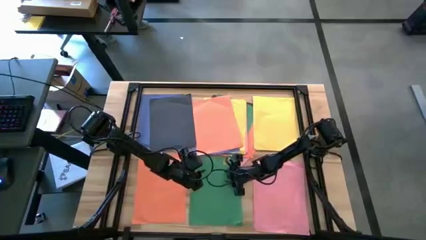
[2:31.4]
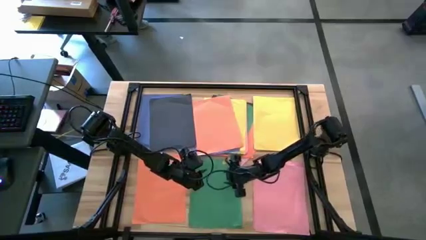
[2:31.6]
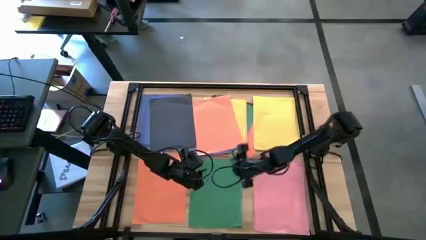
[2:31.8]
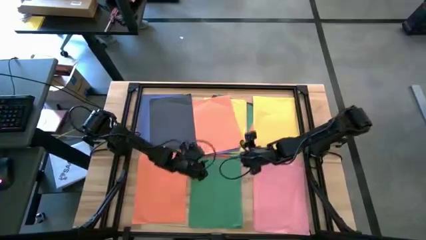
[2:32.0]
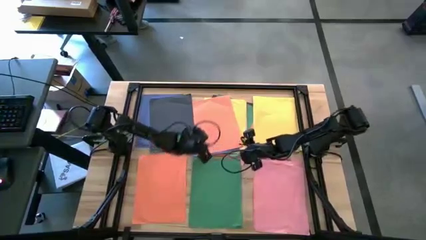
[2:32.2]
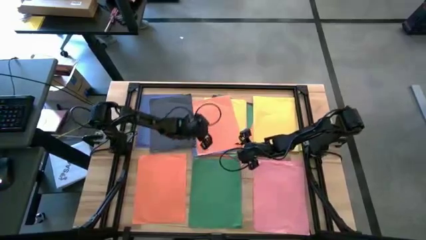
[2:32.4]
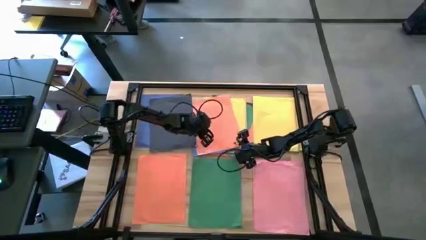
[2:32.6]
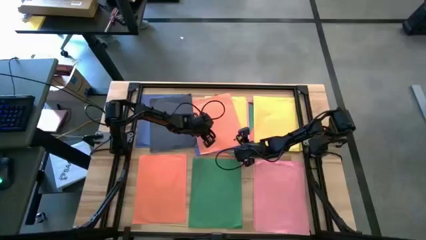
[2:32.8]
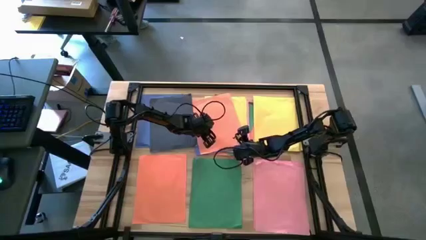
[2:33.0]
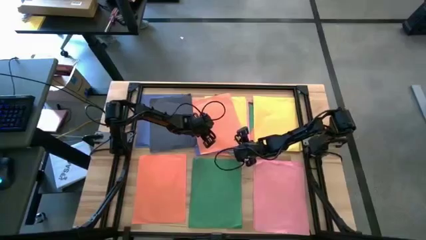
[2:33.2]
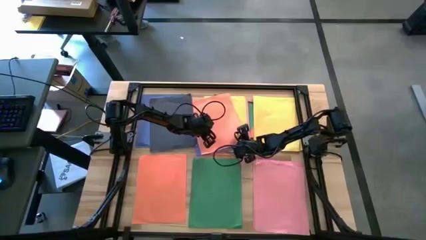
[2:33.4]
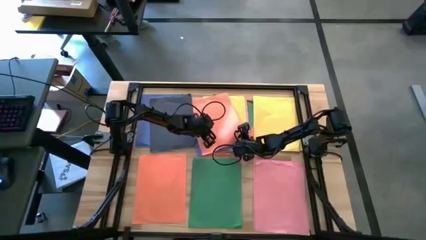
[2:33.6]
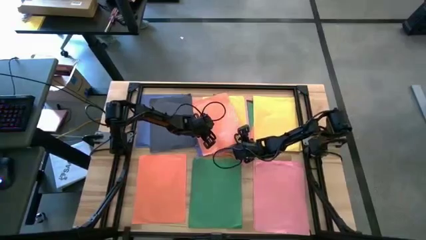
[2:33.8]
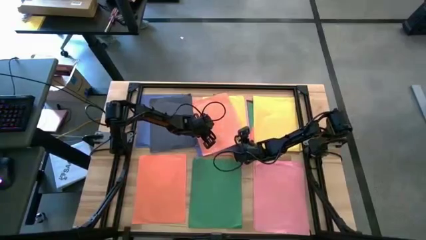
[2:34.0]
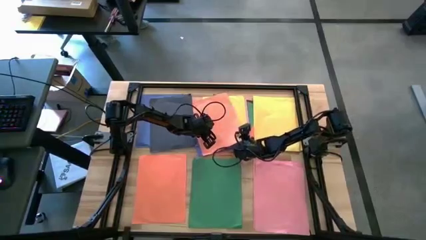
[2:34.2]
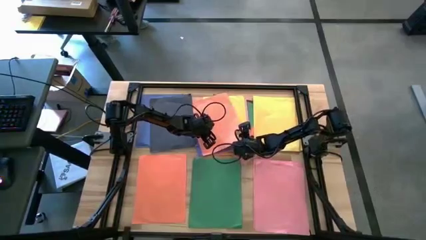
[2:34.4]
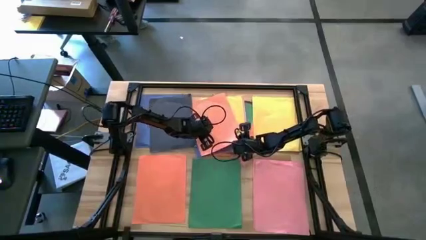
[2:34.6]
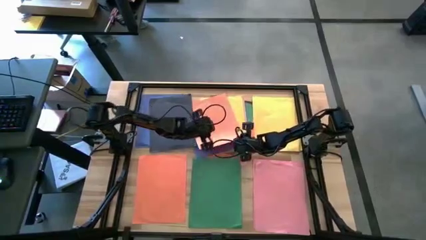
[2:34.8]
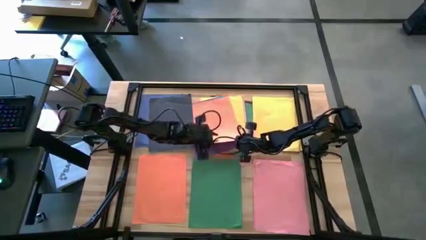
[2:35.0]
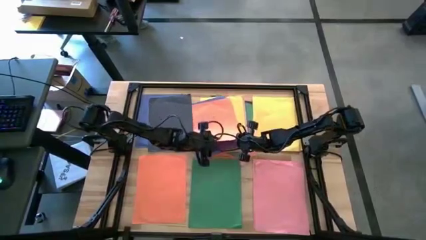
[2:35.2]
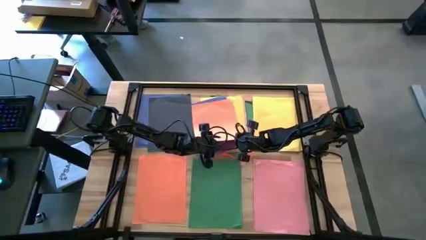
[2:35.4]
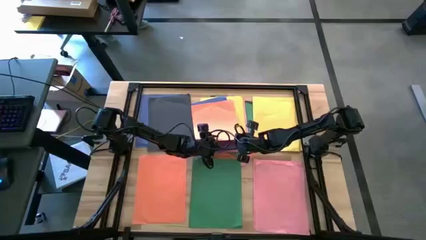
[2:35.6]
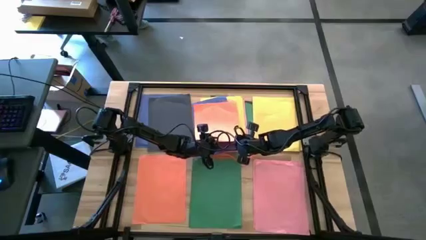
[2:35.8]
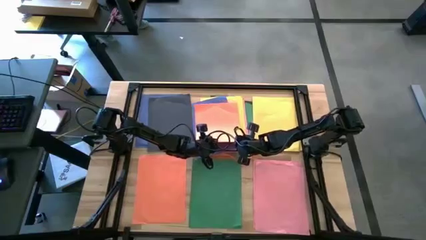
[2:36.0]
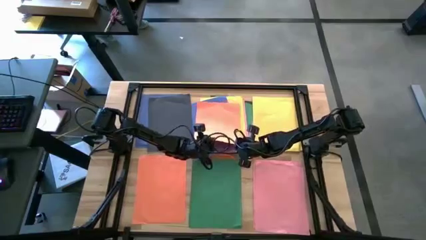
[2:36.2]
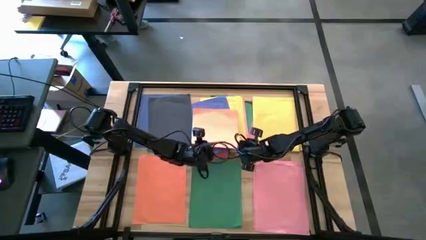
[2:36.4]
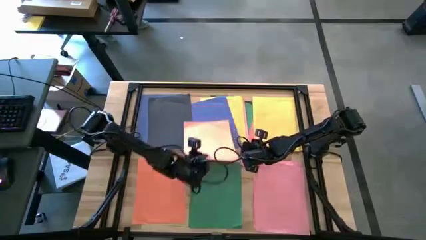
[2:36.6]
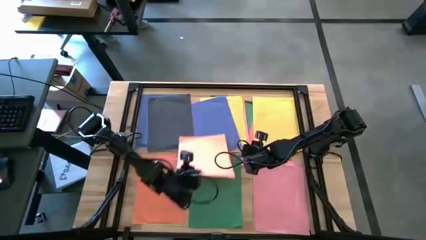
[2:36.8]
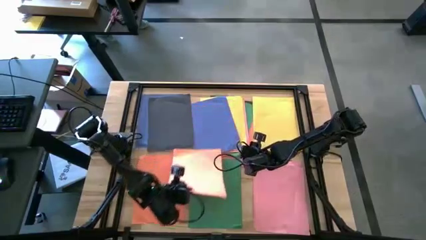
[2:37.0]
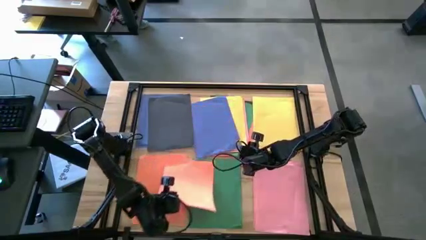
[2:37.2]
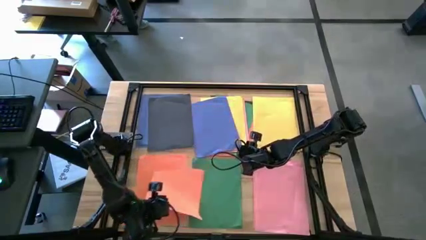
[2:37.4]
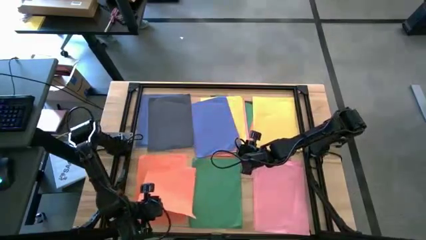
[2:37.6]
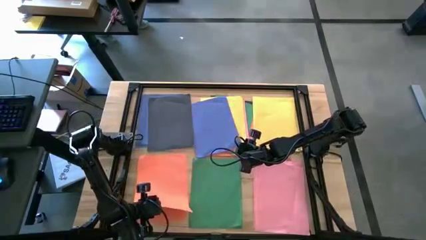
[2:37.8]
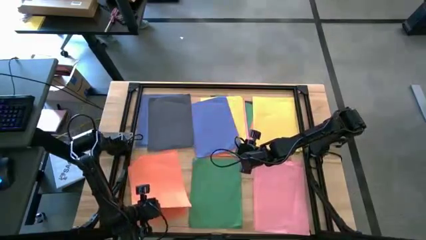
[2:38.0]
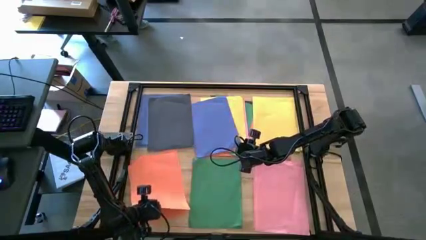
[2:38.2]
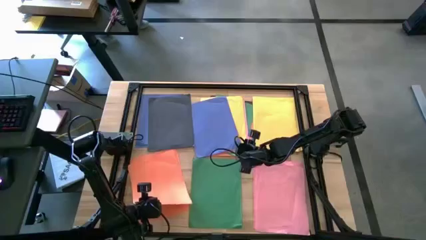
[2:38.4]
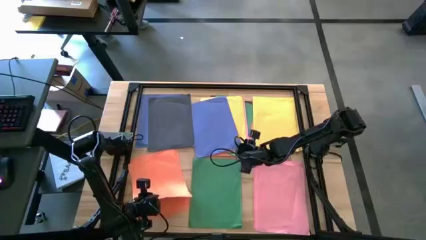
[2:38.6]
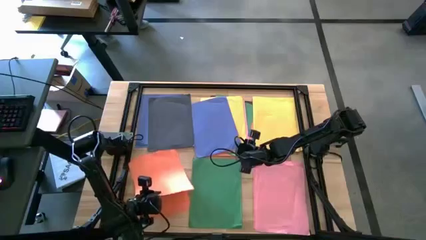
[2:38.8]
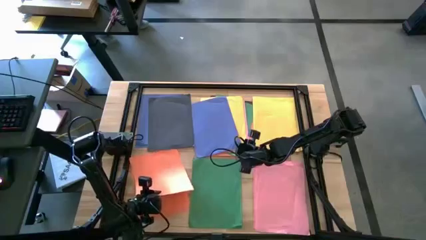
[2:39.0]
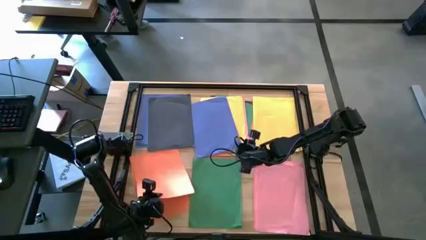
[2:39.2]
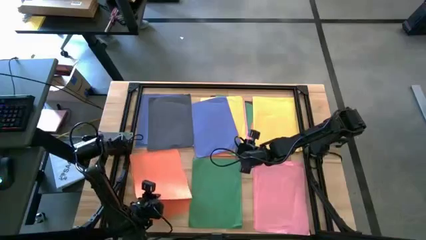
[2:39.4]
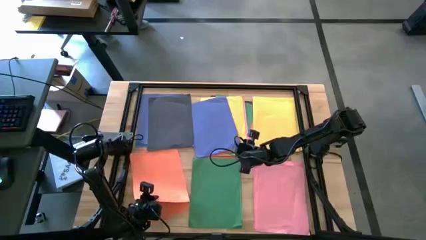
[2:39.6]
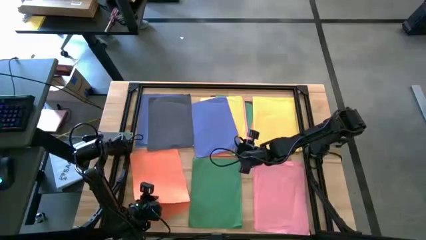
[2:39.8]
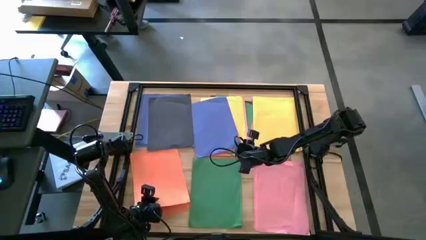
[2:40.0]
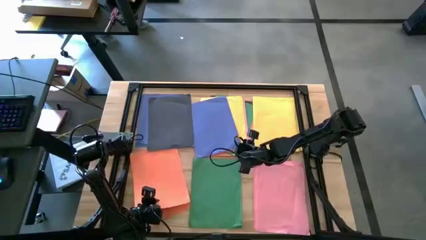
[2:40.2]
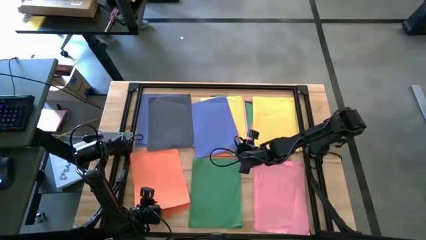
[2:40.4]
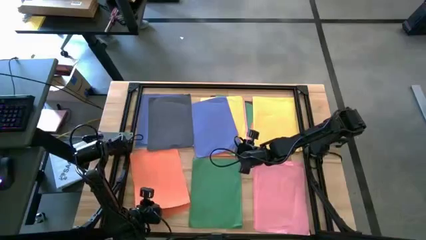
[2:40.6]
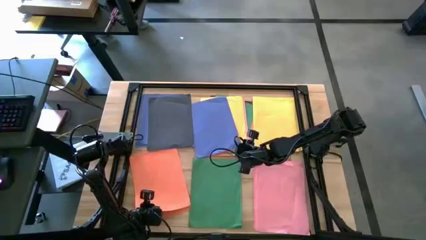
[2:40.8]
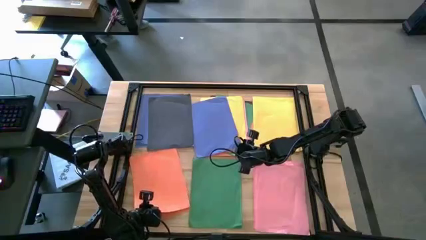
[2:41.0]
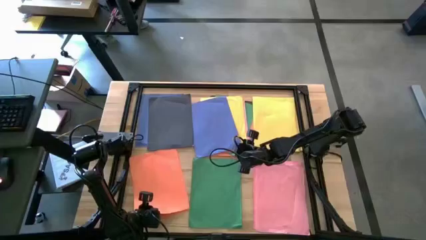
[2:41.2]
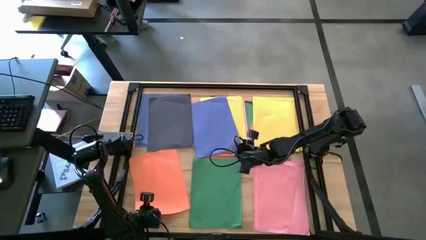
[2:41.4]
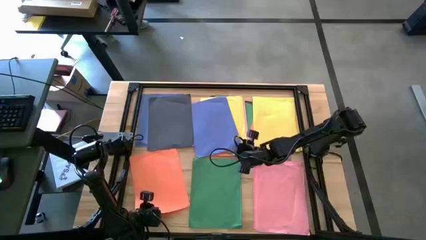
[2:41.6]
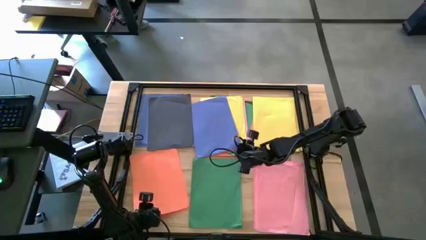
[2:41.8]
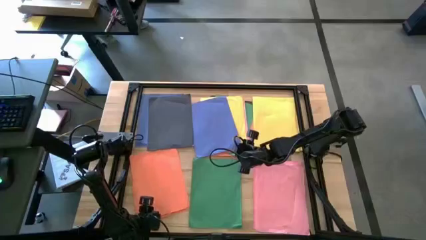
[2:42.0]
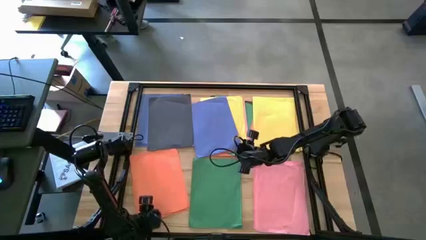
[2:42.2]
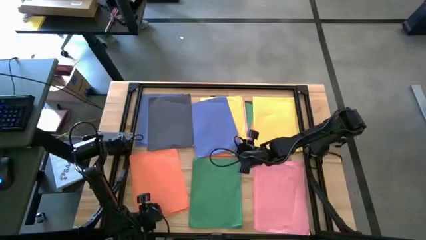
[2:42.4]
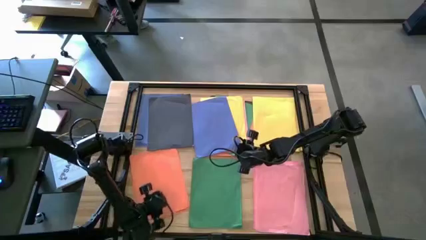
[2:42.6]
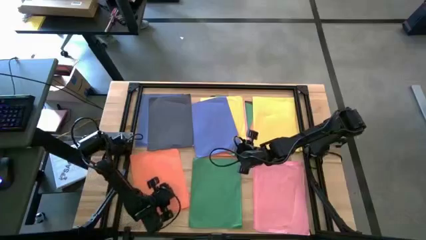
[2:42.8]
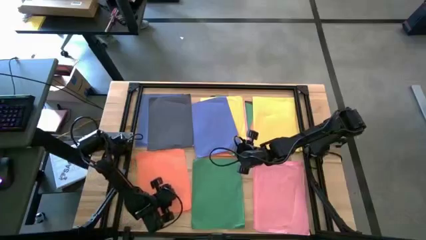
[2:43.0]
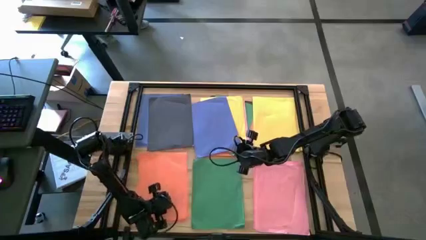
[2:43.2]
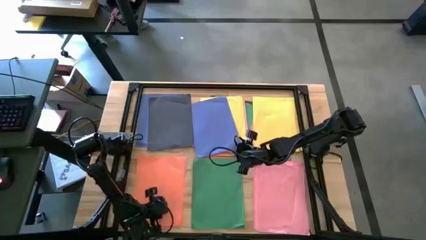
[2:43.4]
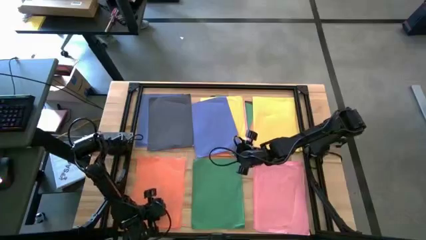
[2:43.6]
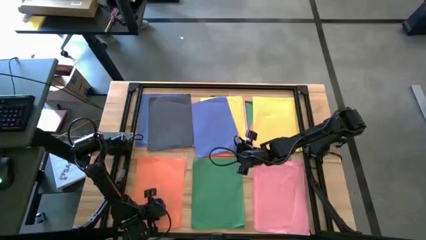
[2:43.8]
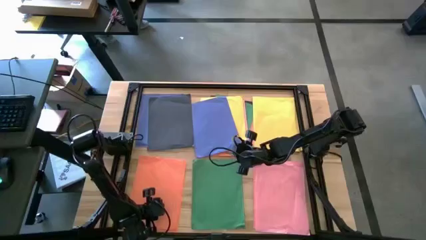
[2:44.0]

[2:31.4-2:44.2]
Task: Organize paper
Stack the orange paper under the black paper on the bottom orange paper
